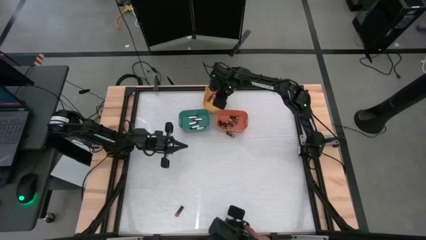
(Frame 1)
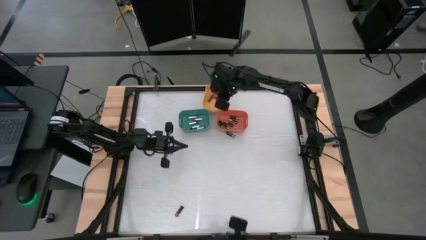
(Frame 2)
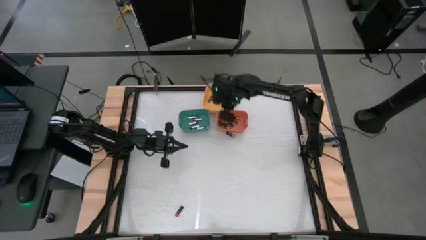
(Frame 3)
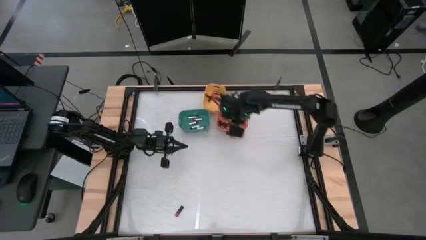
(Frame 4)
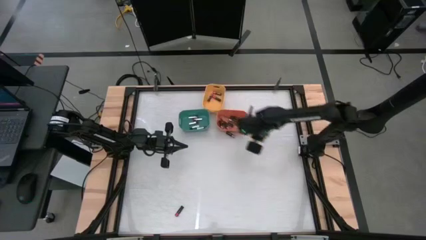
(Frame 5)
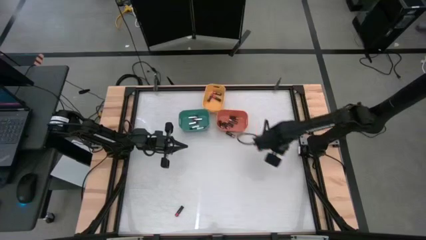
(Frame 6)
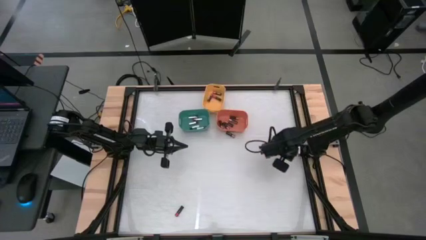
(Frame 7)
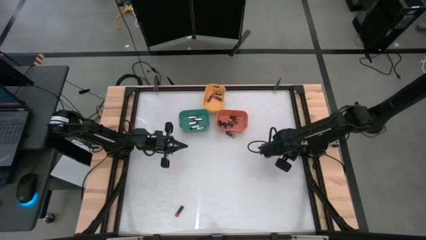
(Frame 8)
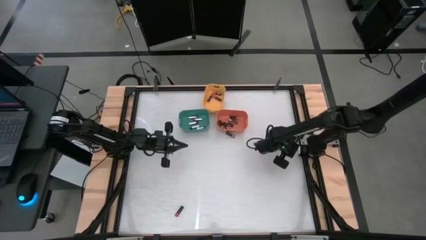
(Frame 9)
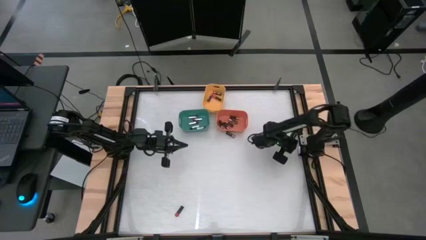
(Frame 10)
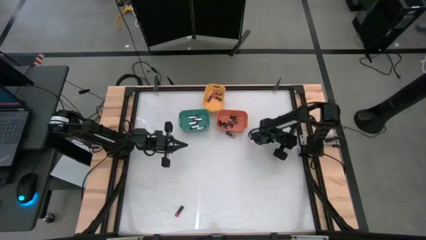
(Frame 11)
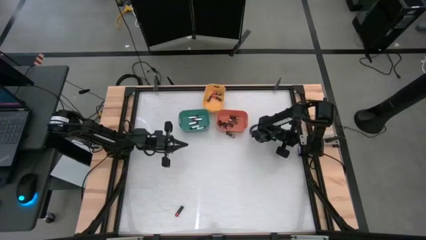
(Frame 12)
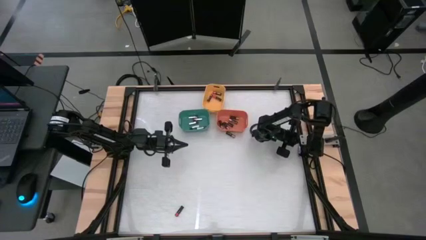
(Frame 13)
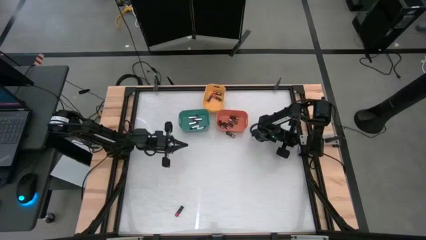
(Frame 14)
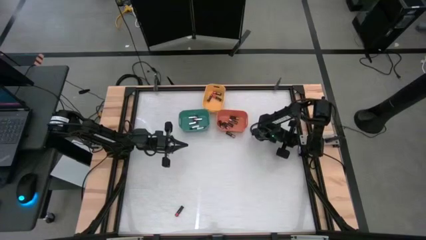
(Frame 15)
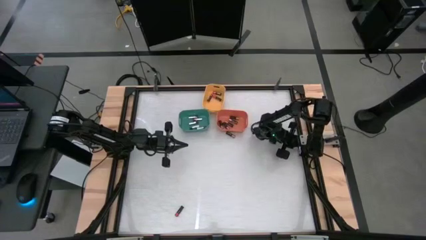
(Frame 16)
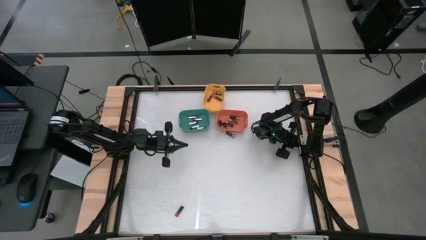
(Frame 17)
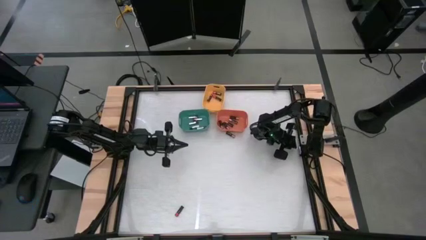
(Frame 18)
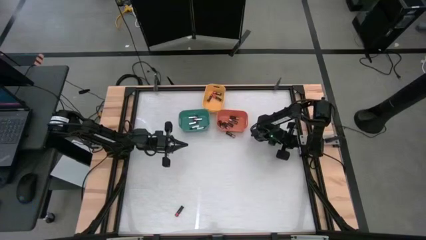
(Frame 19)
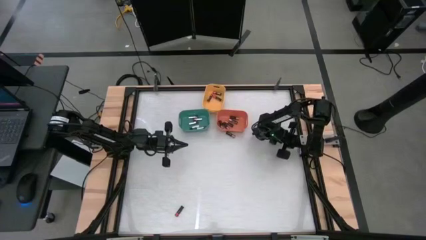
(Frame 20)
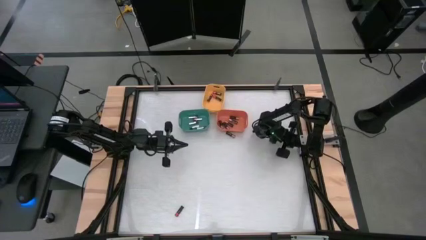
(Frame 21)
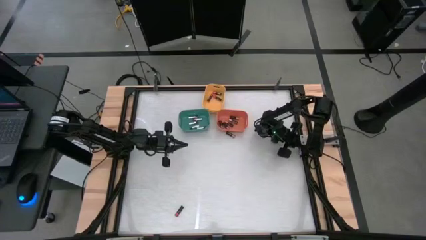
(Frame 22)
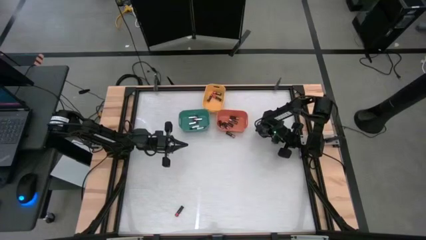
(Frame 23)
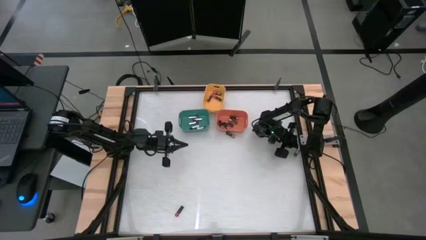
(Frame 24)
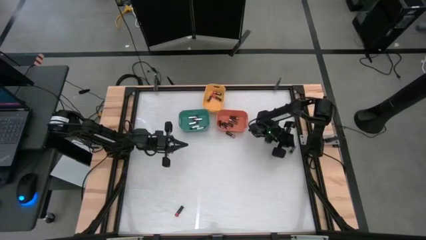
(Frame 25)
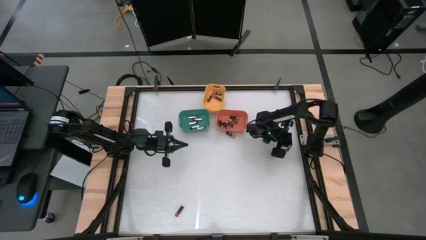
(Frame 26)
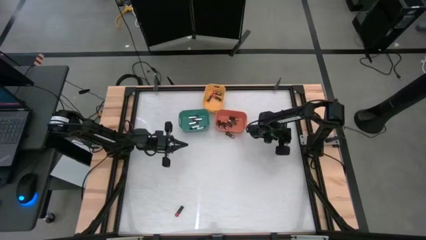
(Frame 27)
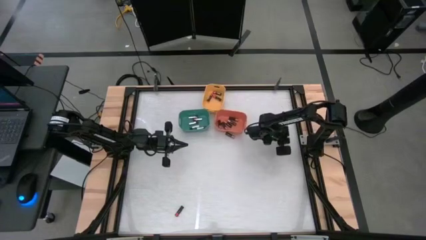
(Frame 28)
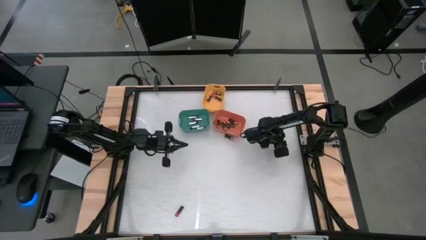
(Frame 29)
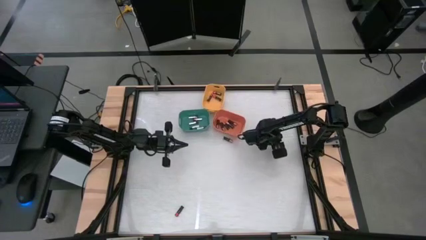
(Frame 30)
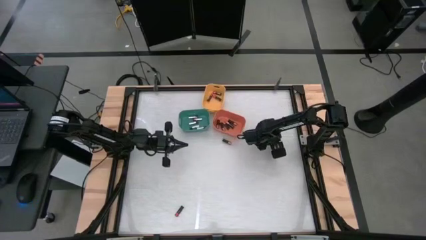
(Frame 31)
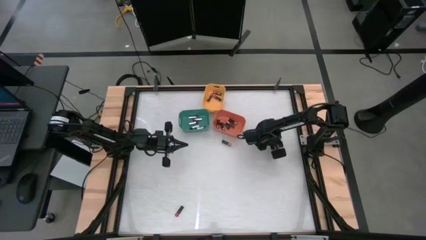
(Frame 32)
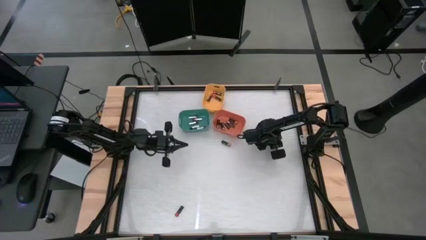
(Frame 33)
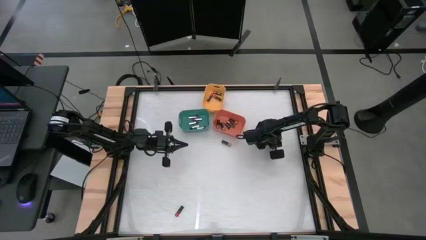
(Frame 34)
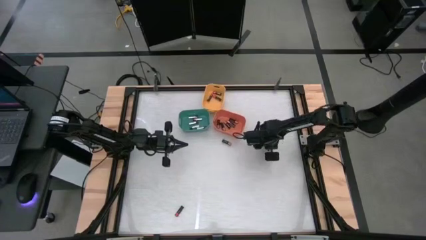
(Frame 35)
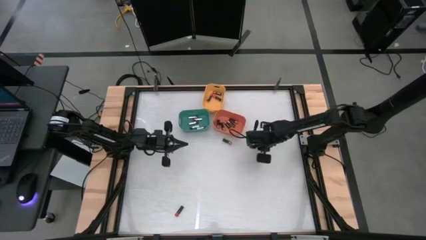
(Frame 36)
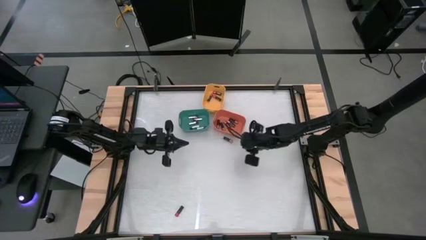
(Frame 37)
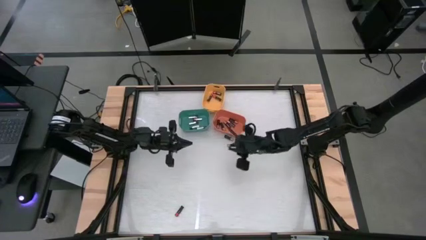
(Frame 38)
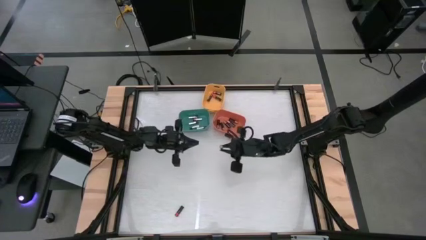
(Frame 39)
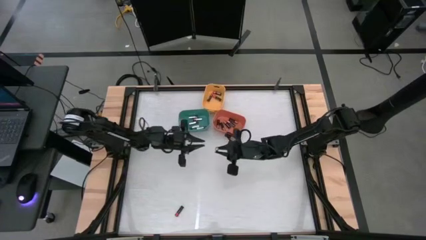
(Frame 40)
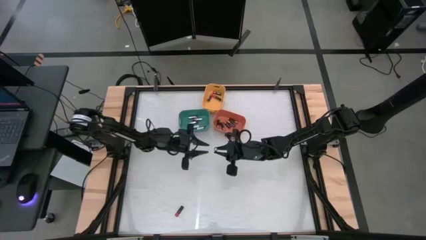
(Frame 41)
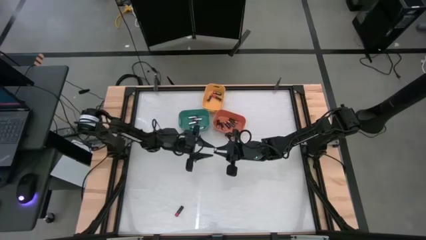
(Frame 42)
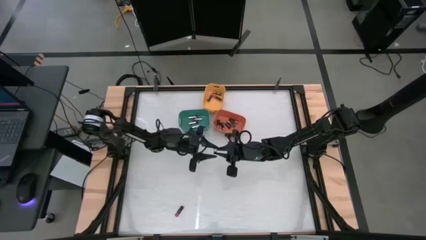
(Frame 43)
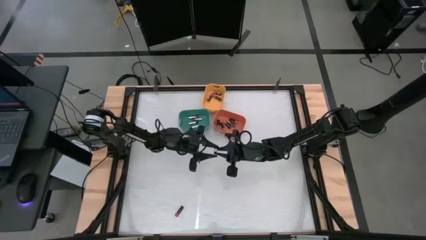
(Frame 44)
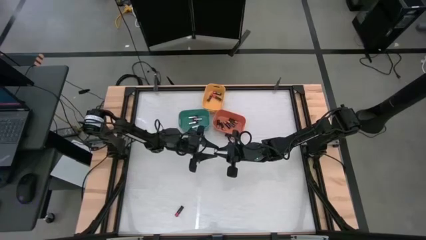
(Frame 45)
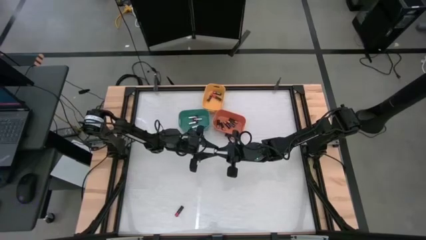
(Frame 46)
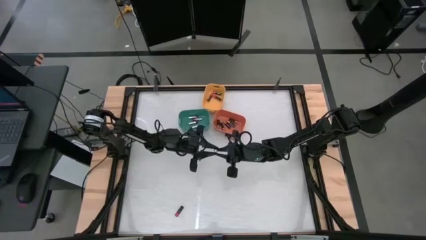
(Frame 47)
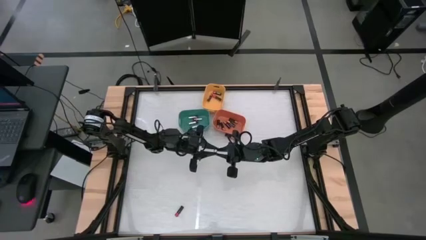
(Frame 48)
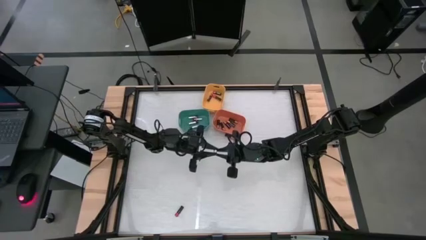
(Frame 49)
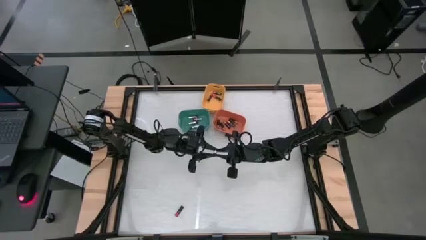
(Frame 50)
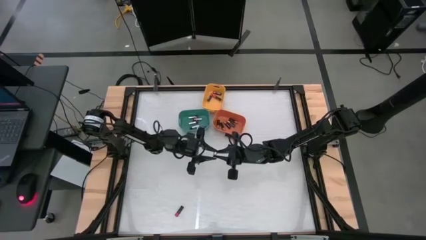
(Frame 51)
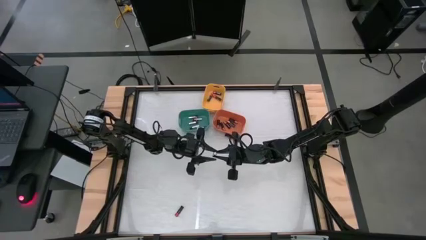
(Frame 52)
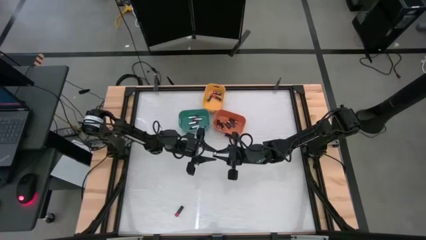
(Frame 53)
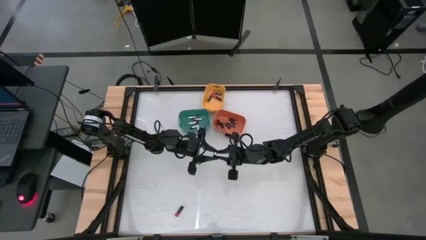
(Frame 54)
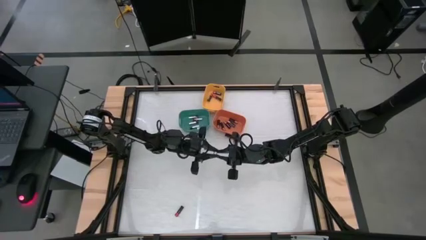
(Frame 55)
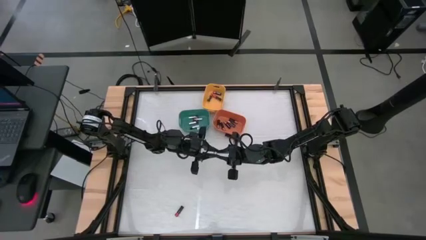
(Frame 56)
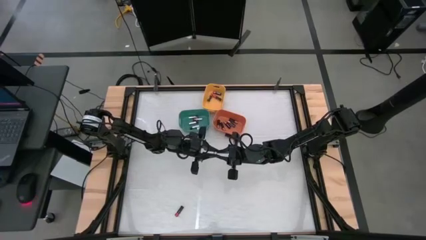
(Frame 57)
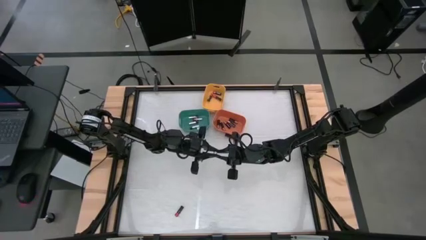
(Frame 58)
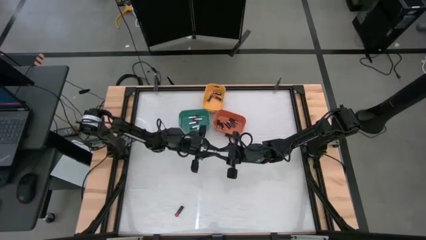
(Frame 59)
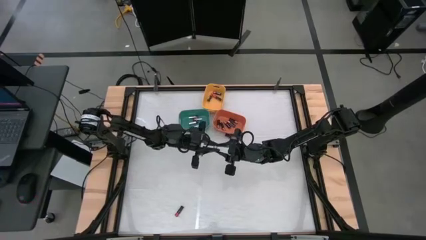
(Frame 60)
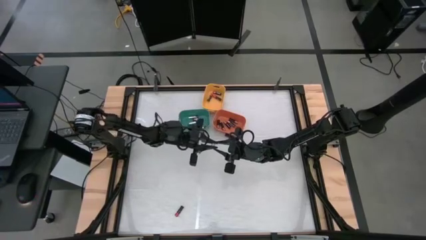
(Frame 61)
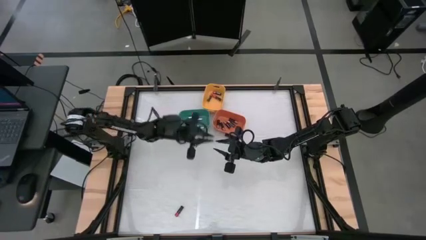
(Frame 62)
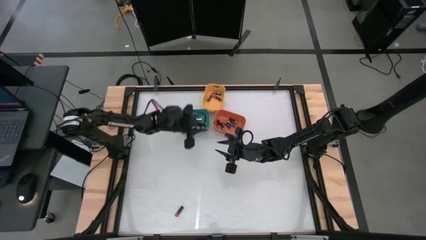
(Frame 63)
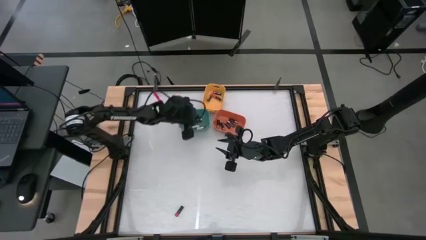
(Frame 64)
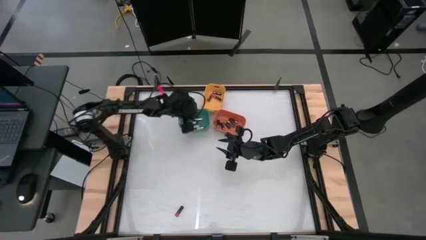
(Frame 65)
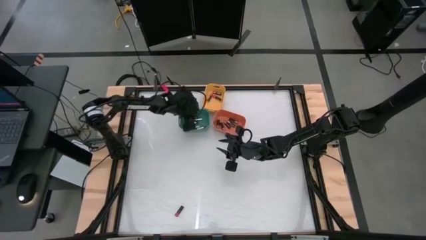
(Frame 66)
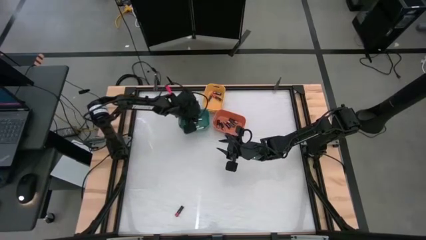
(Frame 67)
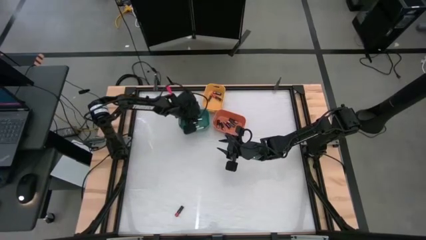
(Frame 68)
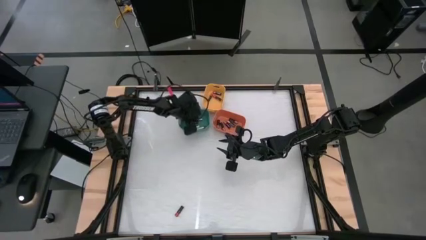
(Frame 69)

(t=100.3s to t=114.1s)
Task: Sort batteries
Put the silver battery into the green bin

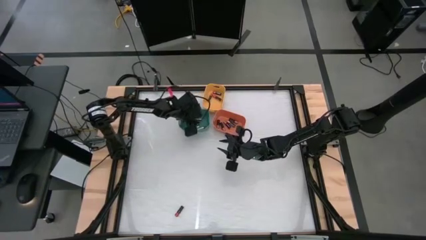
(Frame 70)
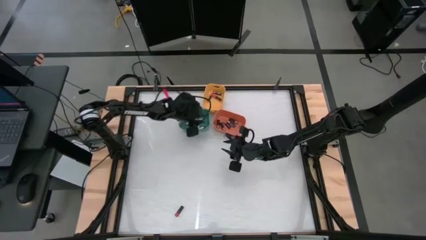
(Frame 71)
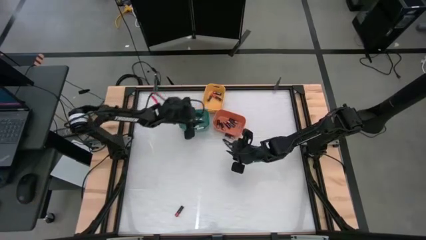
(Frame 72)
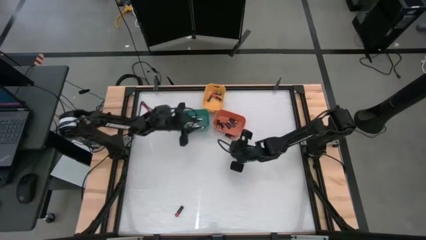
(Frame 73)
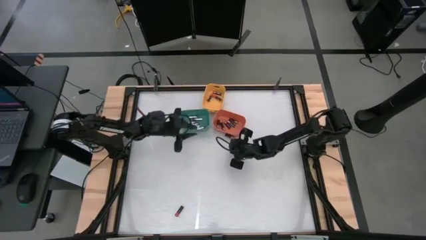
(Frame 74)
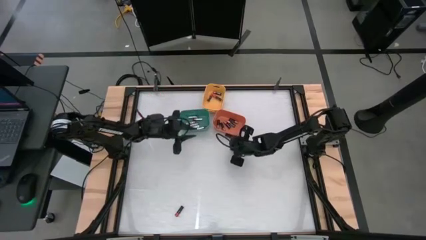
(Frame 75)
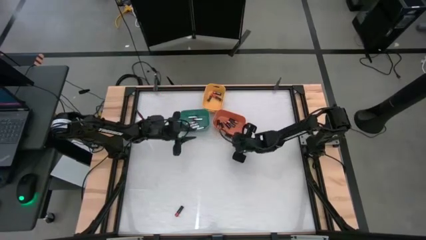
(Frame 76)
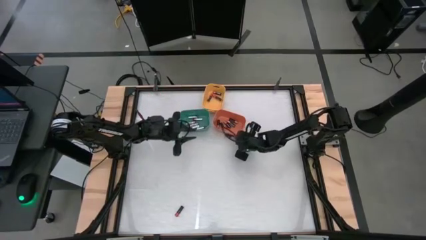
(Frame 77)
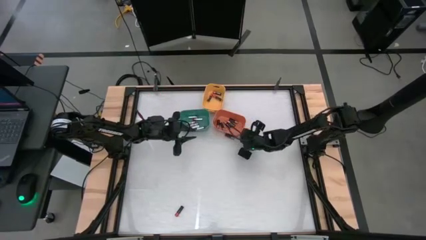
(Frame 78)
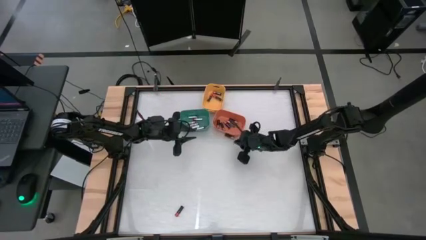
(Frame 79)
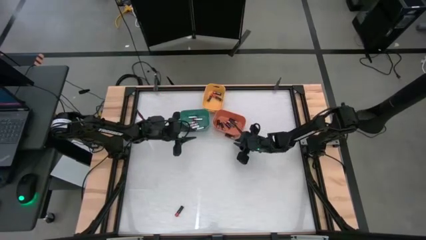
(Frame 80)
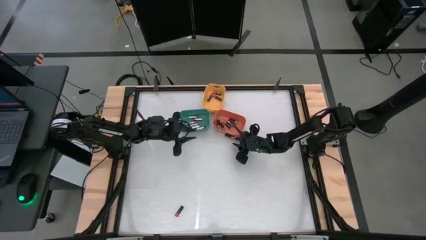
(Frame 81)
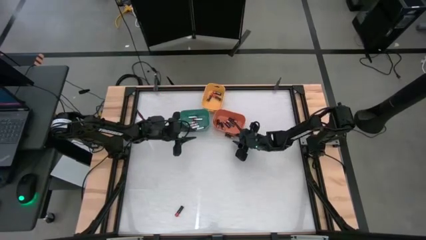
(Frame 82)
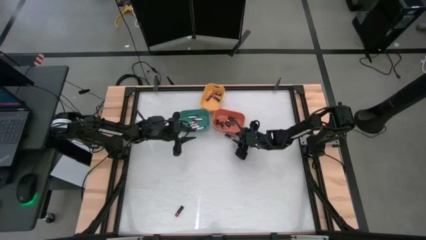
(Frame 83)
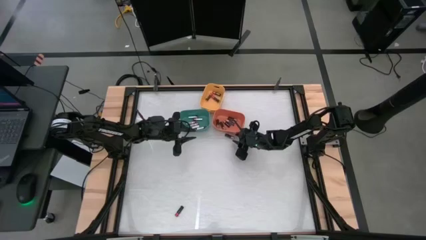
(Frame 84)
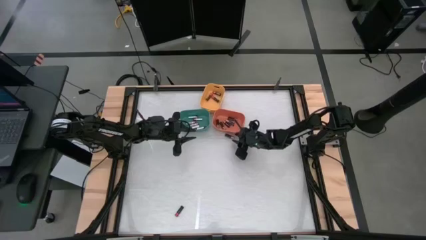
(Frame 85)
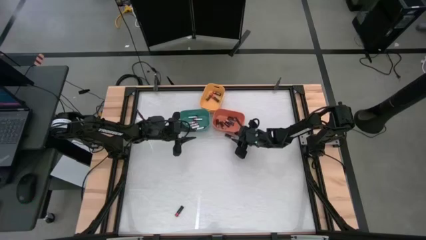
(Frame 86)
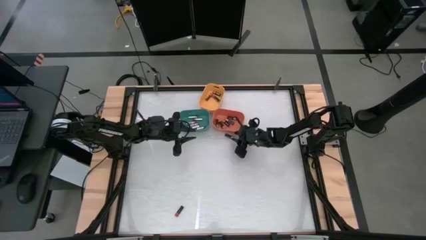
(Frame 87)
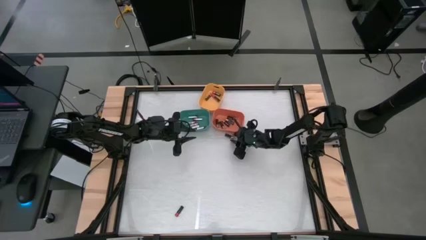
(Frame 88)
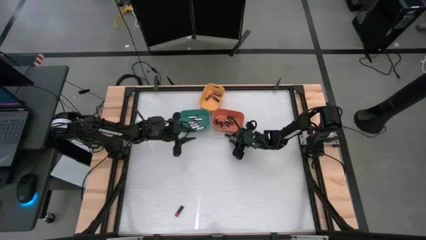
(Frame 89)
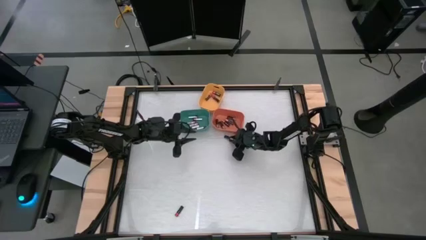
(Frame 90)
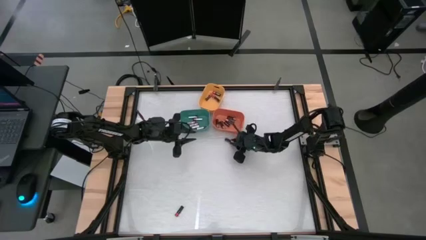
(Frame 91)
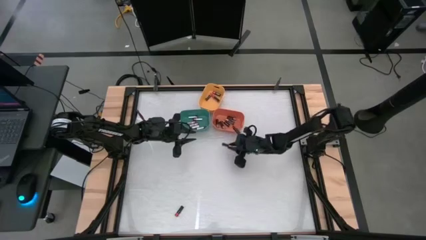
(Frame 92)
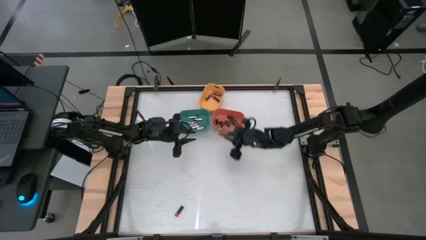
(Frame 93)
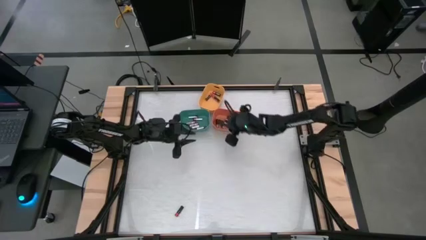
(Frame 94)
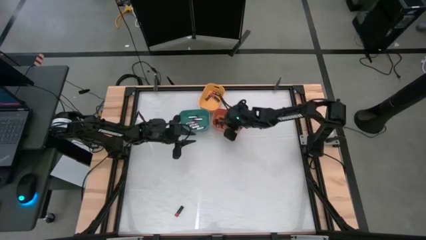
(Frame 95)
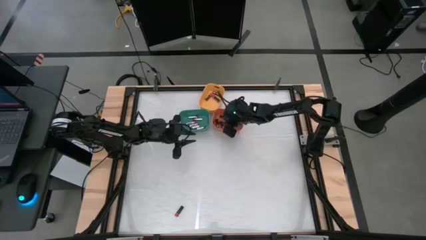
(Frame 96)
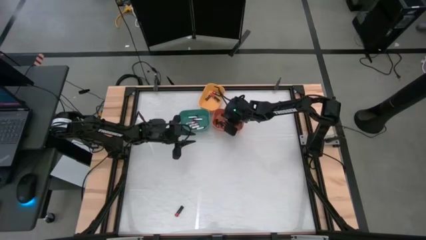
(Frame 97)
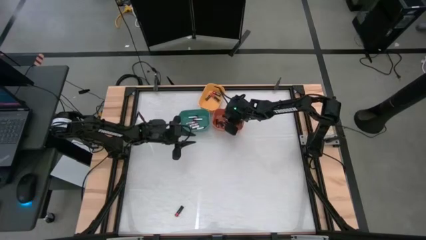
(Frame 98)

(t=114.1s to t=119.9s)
Put the brown battery into the orange bin
